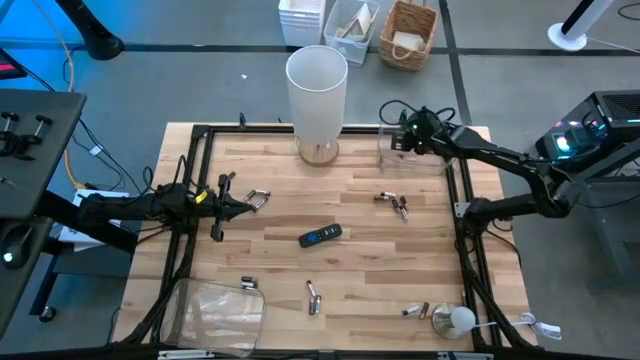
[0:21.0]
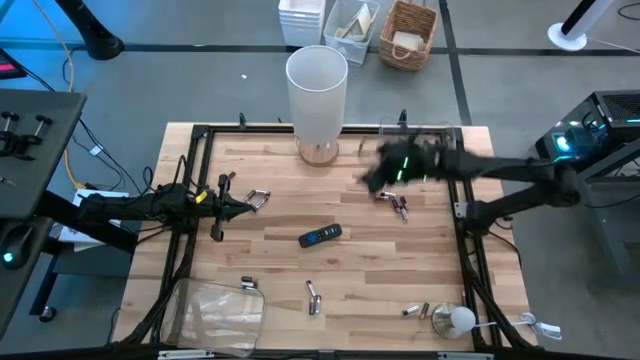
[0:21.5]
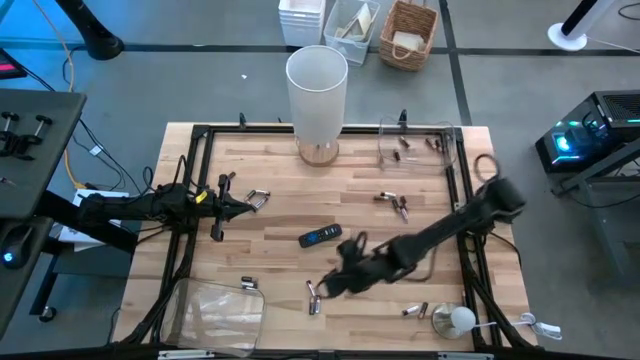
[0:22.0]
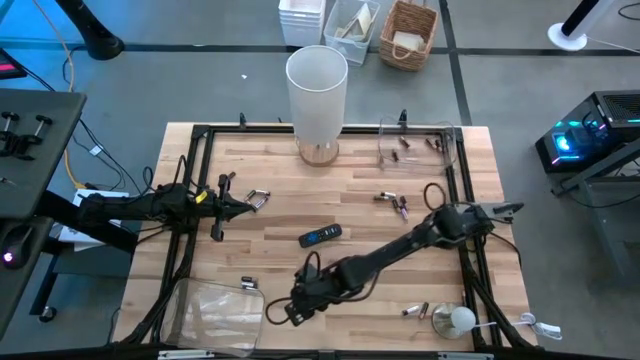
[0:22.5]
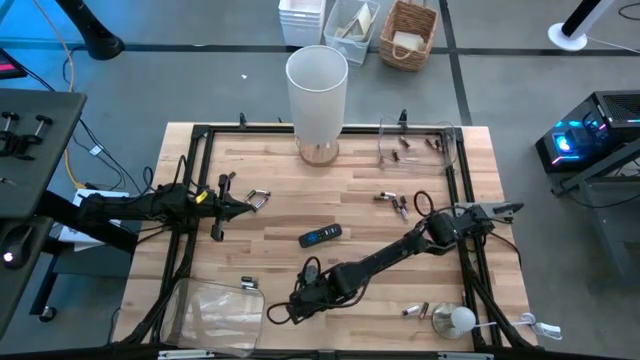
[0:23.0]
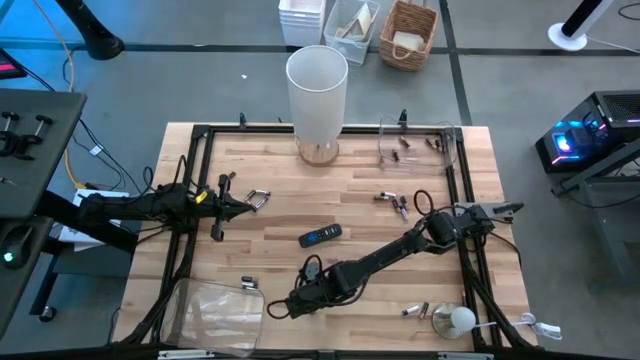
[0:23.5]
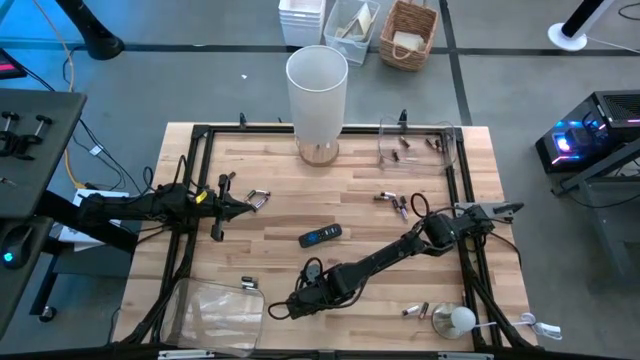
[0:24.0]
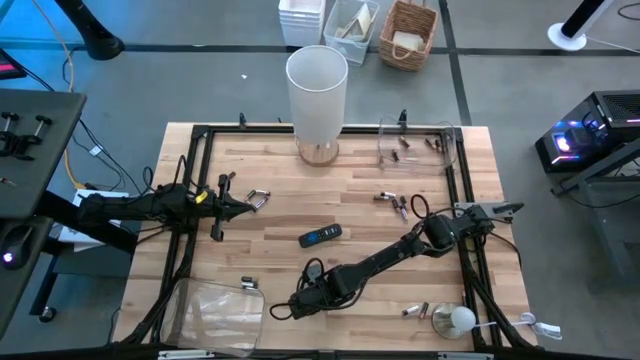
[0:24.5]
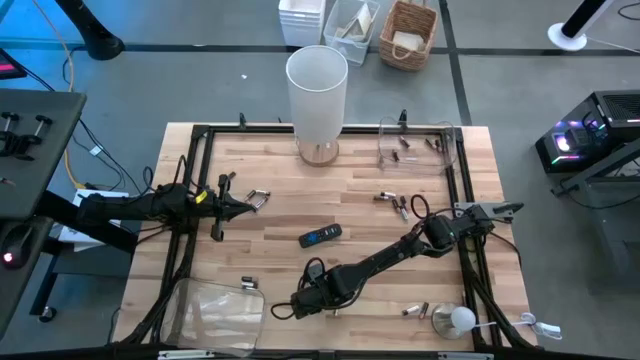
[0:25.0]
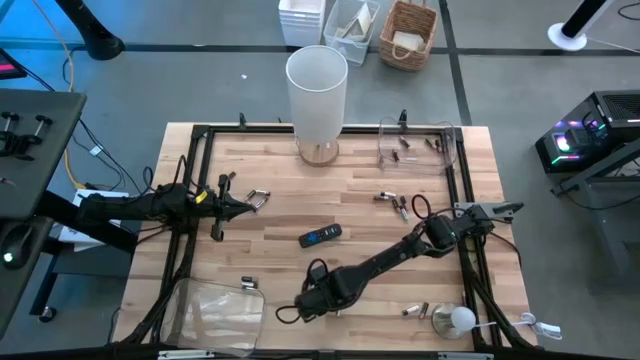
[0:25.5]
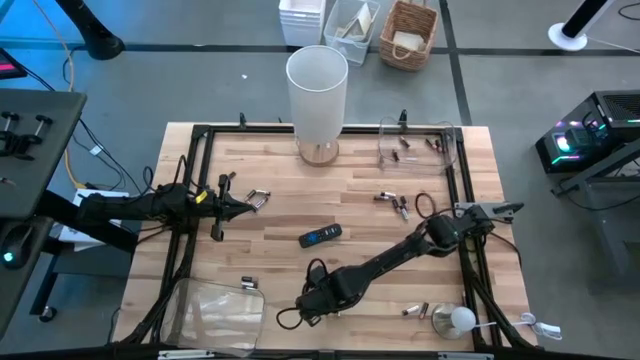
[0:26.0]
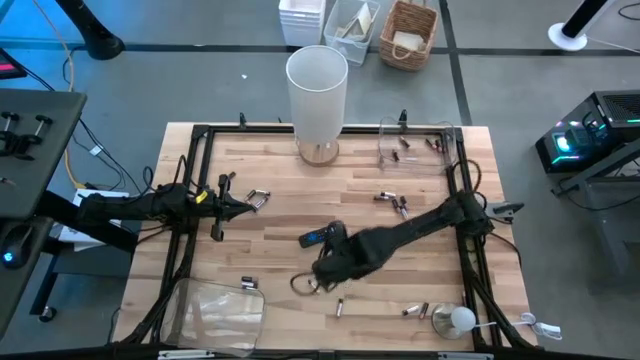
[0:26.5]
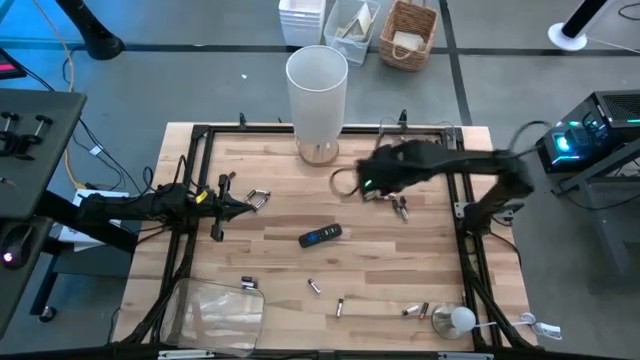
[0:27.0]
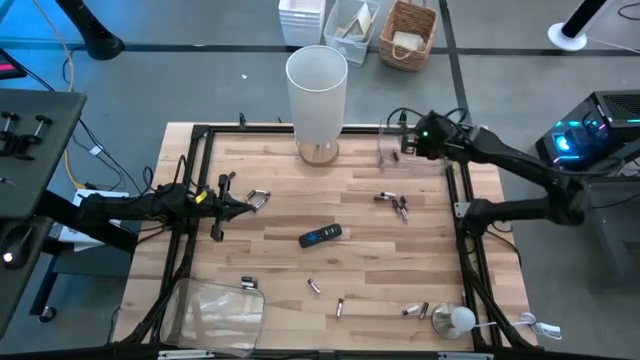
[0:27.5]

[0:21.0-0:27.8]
Task: Sort batteries
Put the black battery into the top transparent bin

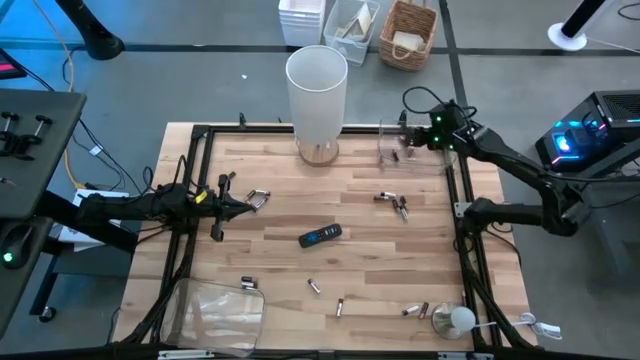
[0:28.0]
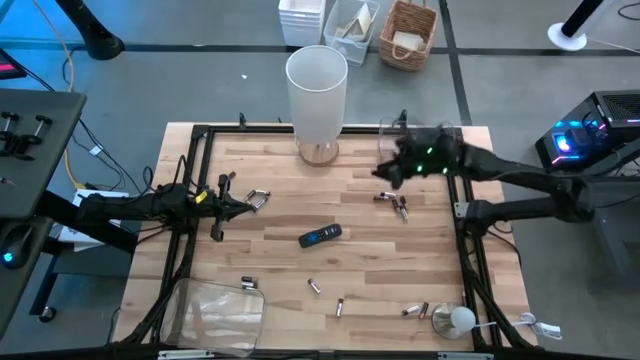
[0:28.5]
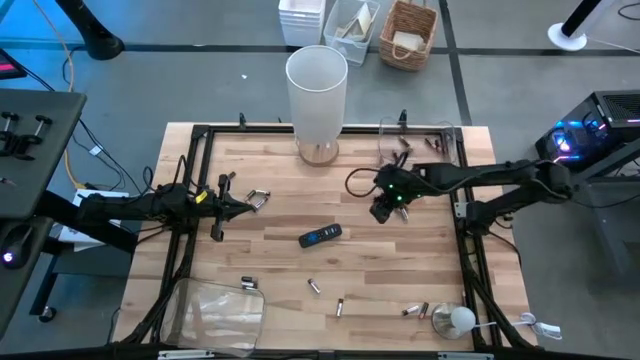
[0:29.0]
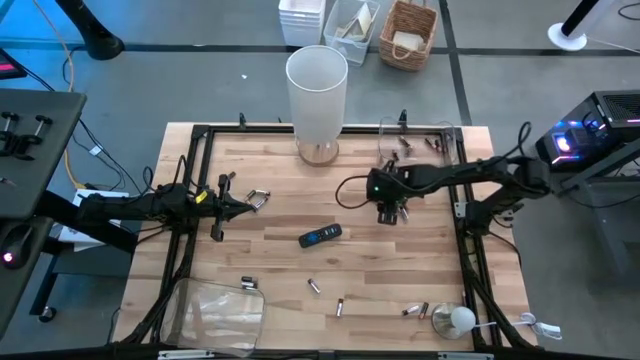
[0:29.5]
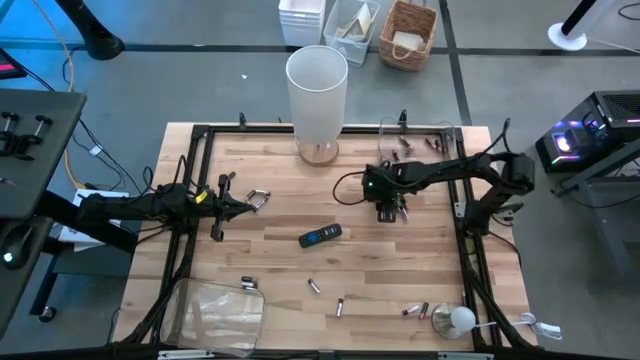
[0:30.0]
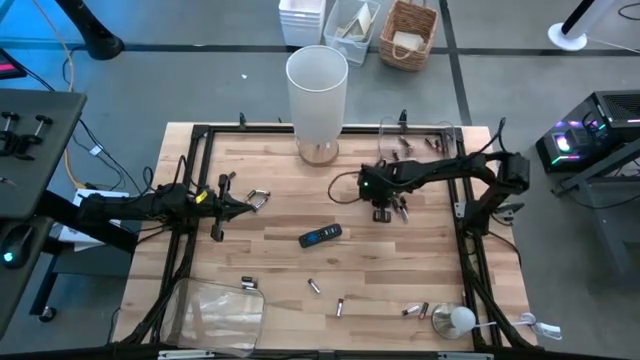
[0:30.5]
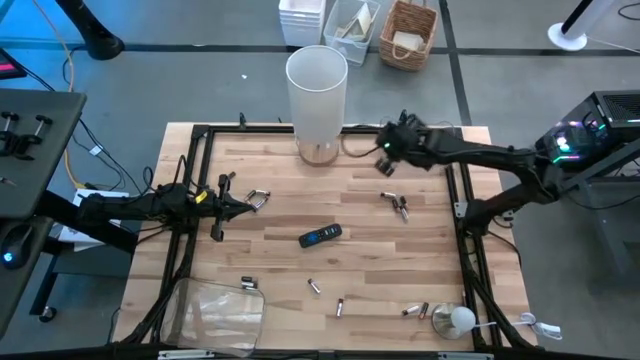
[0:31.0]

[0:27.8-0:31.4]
Put the black battery into the top transparent bin

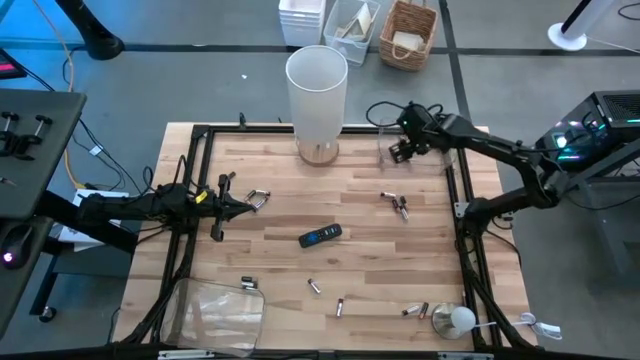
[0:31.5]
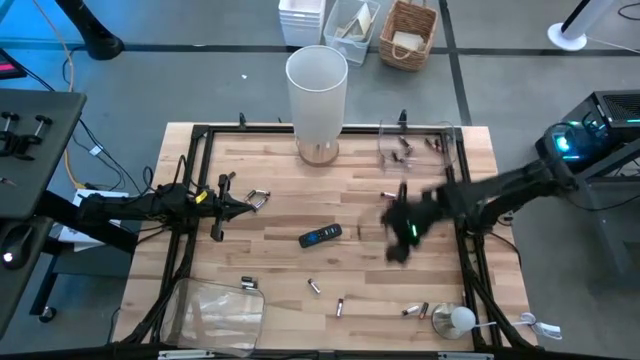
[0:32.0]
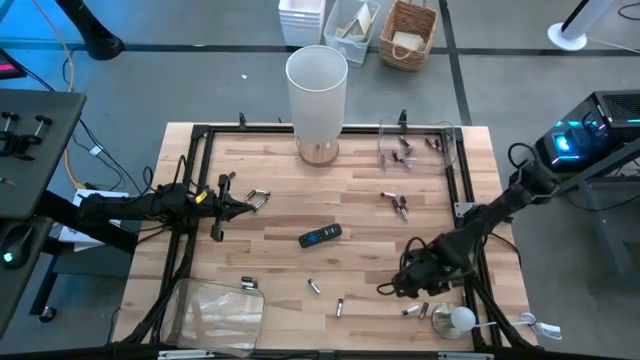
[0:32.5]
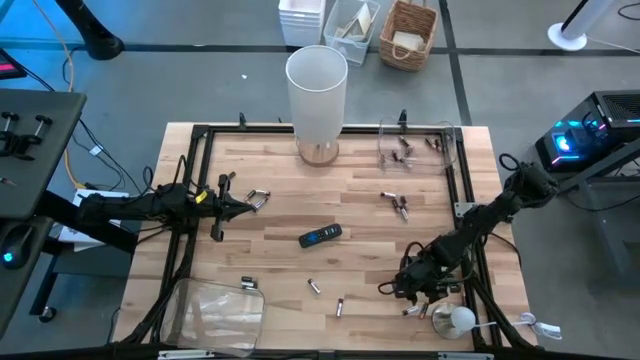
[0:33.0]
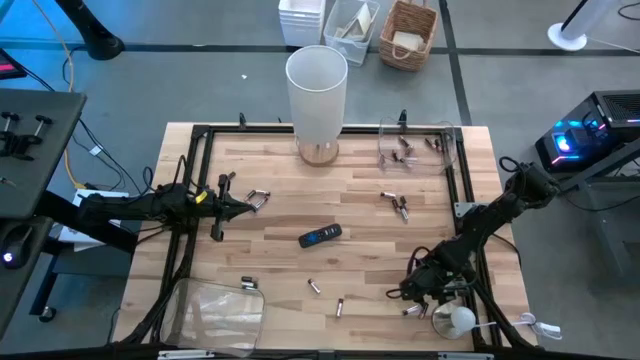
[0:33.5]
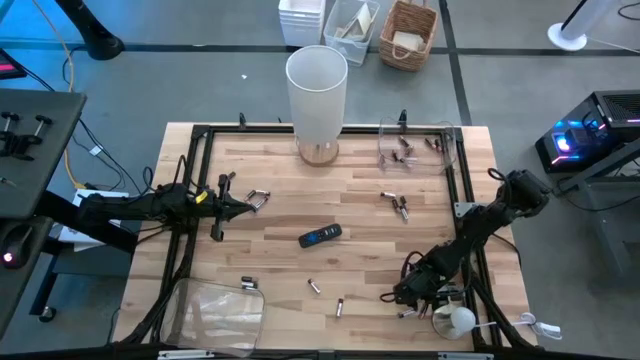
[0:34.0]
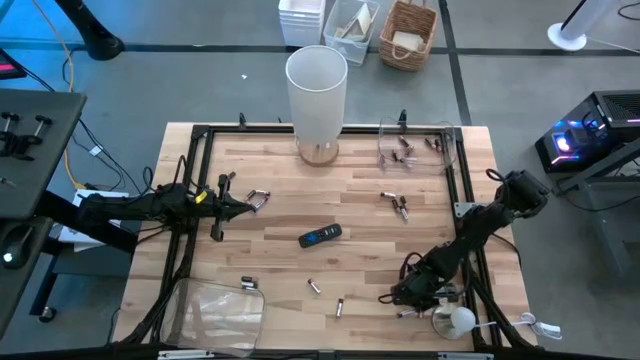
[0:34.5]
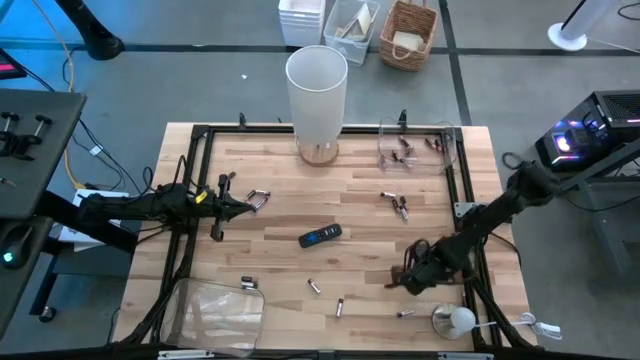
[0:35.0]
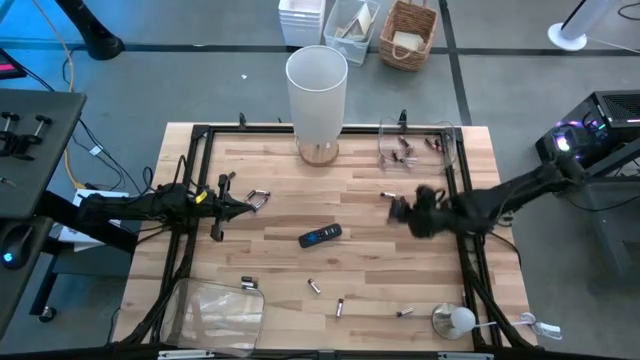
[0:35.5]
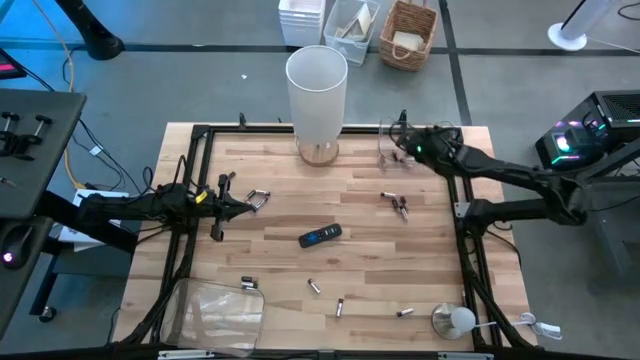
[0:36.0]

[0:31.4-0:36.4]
Put the black battery into the top transparent bin

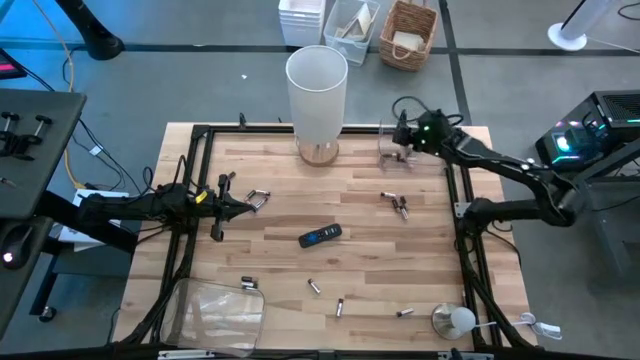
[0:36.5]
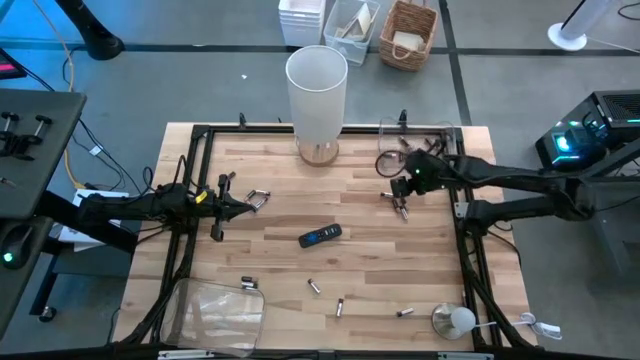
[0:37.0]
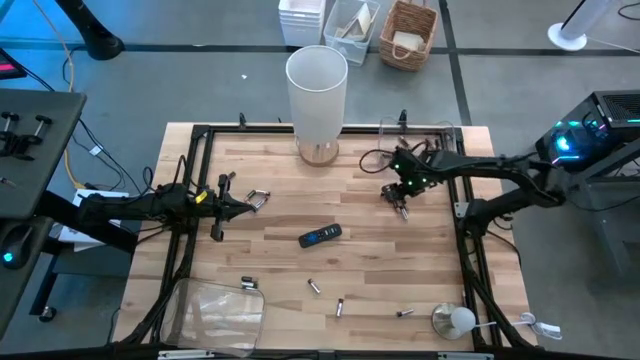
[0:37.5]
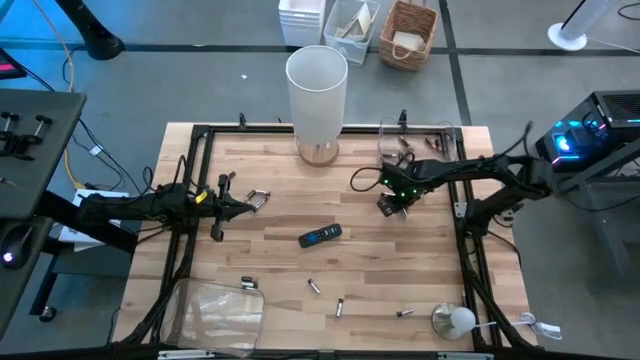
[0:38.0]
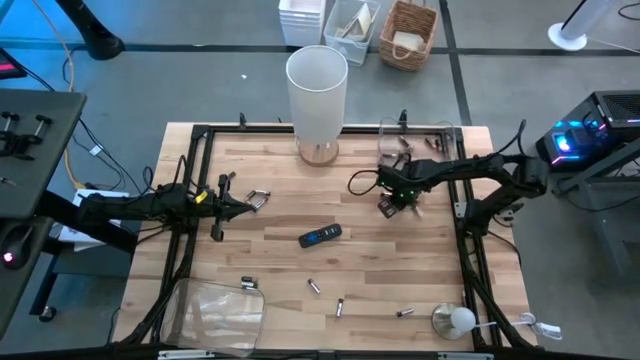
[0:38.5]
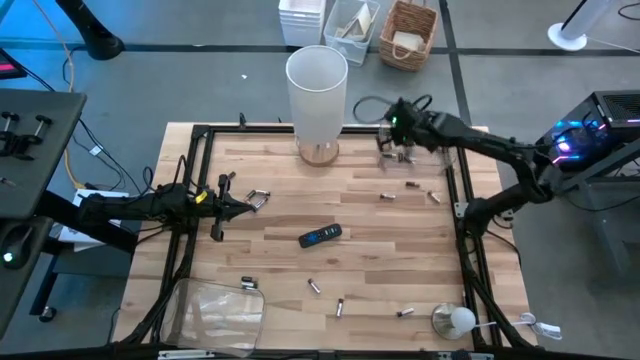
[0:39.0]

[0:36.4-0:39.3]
Put the black battery into the top transparent bin

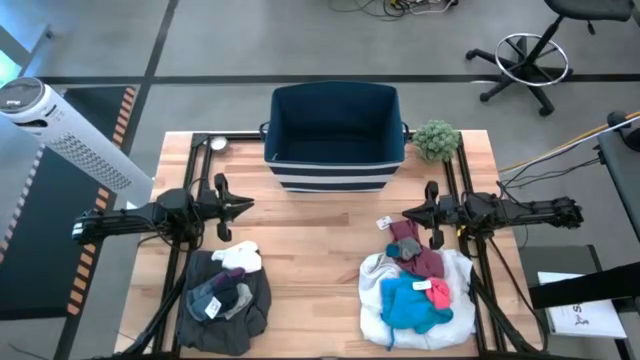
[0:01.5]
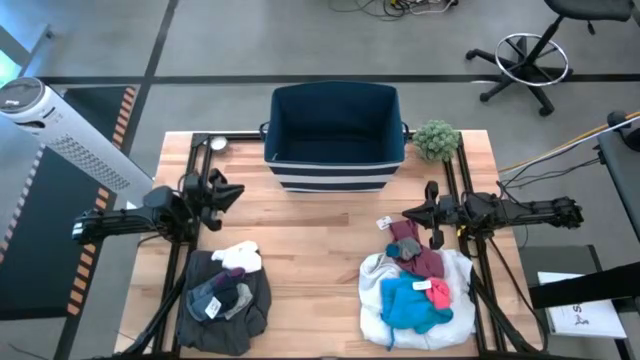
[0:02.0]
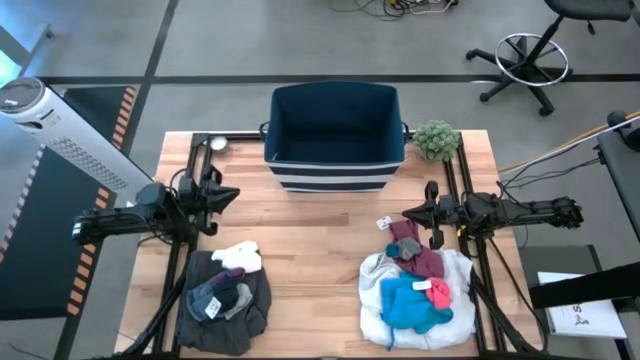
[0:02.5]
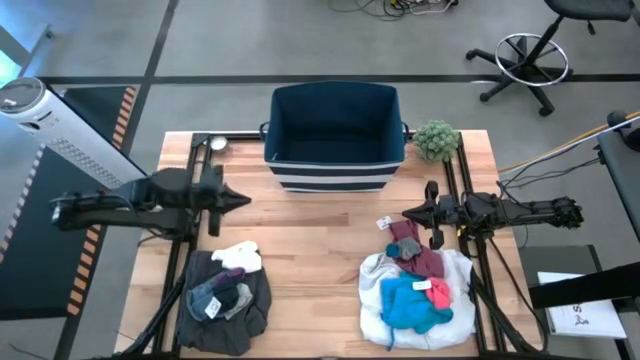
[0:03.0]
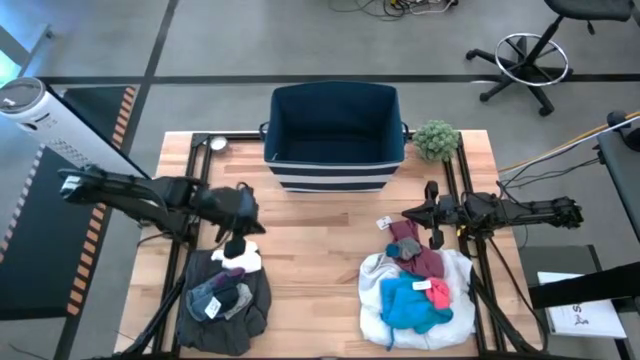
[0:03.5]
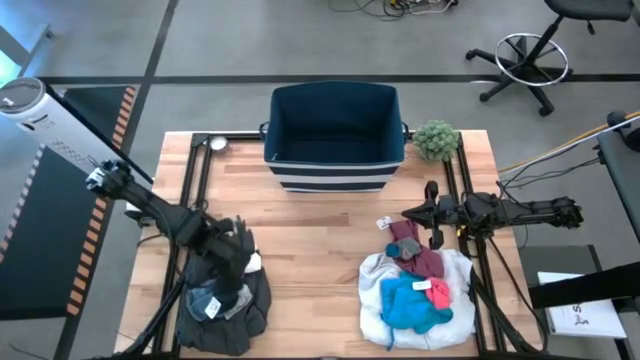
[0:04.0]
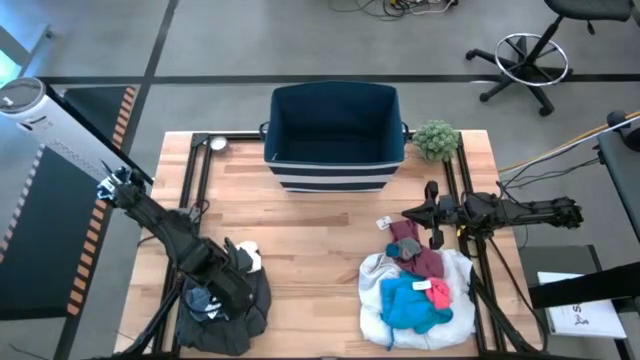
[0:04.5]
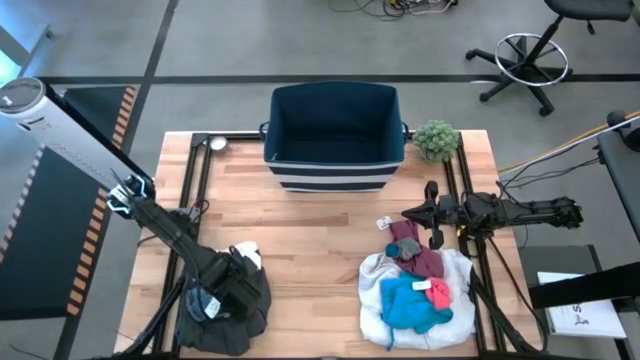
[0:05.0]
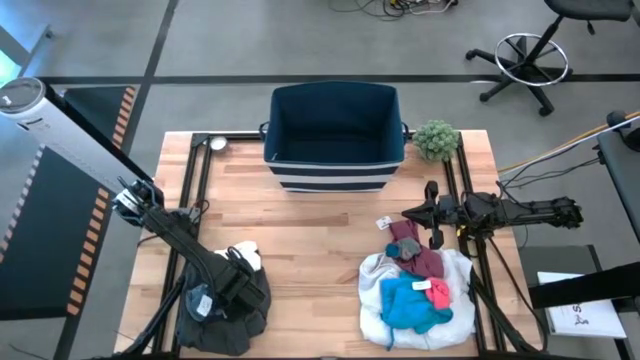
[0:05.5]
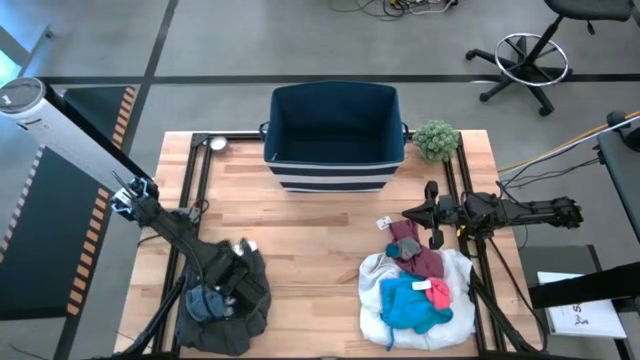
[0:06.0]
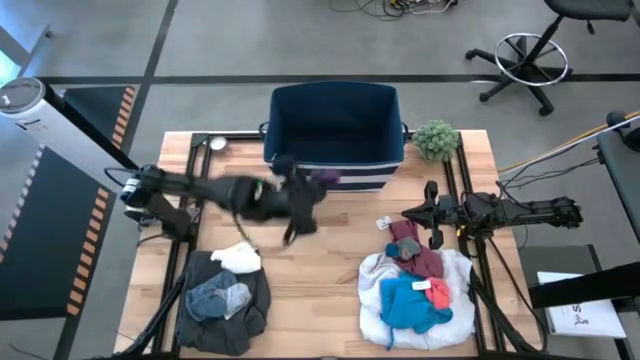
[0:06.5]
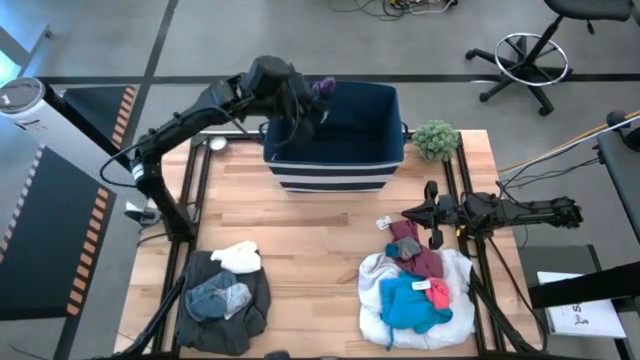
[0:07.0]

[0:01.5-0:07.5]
Task: Sort clothes
Put the black and purple socks into the laundry organizer
